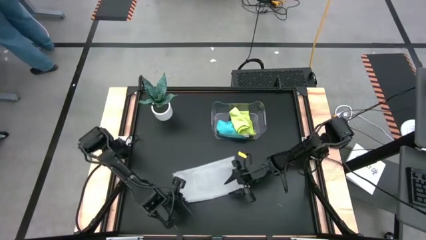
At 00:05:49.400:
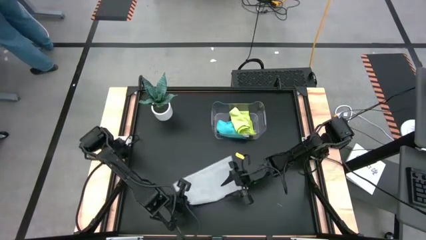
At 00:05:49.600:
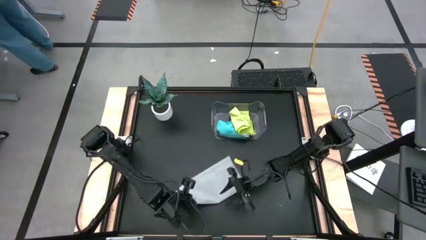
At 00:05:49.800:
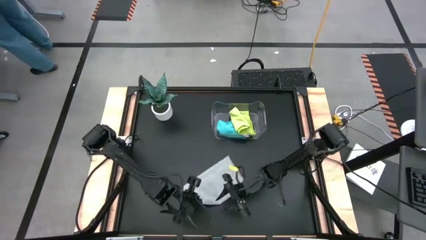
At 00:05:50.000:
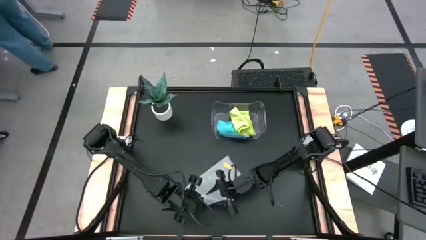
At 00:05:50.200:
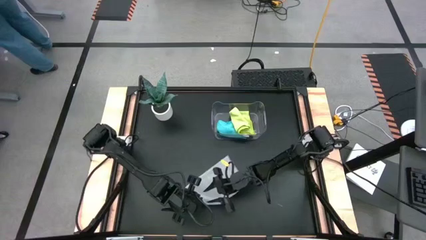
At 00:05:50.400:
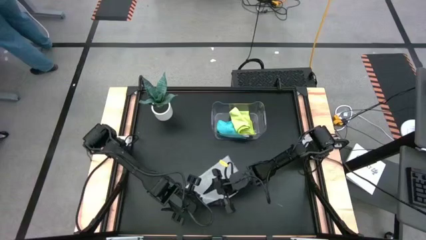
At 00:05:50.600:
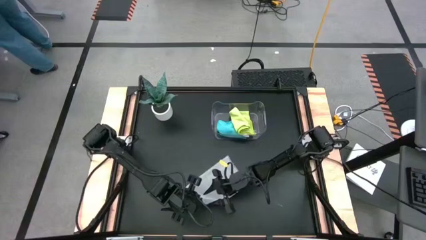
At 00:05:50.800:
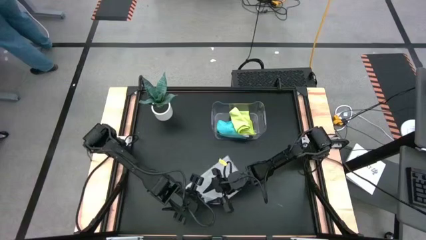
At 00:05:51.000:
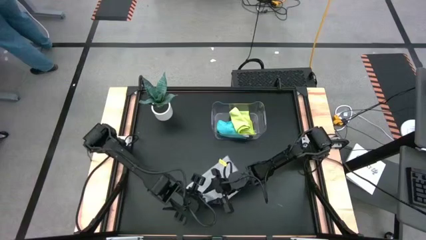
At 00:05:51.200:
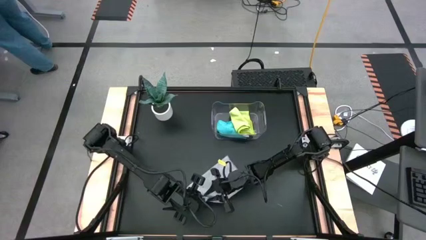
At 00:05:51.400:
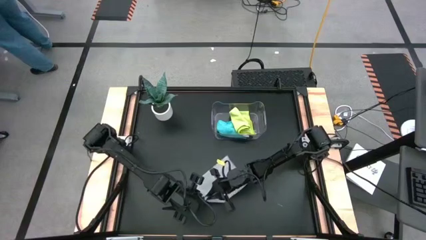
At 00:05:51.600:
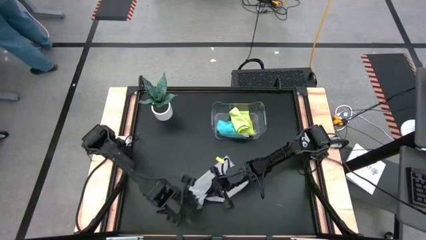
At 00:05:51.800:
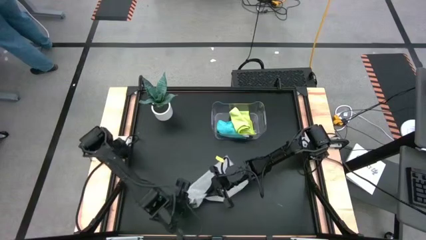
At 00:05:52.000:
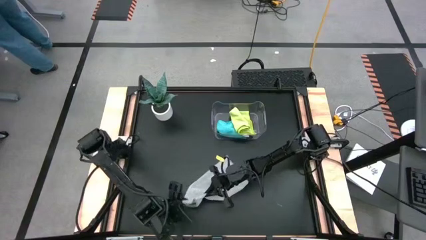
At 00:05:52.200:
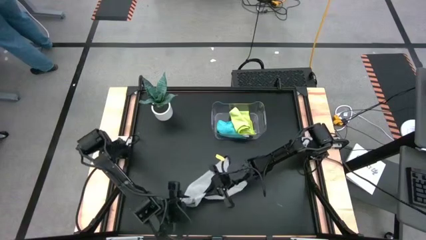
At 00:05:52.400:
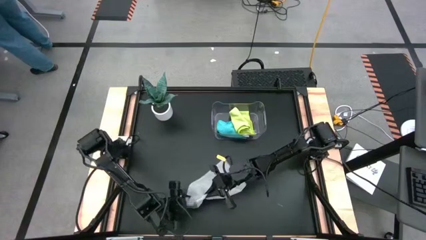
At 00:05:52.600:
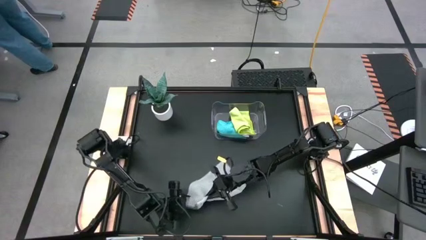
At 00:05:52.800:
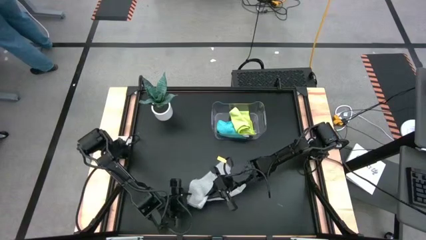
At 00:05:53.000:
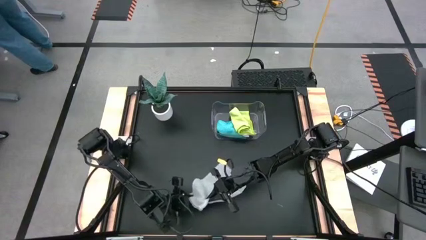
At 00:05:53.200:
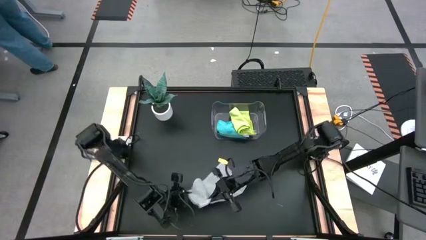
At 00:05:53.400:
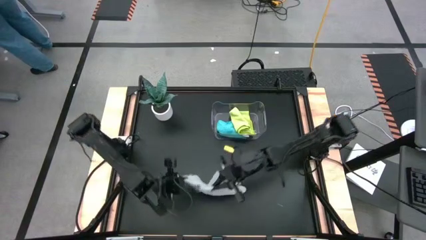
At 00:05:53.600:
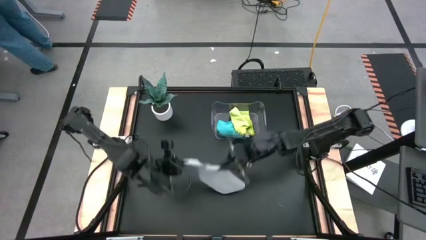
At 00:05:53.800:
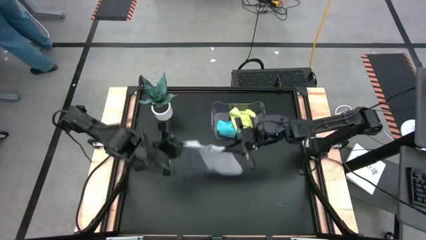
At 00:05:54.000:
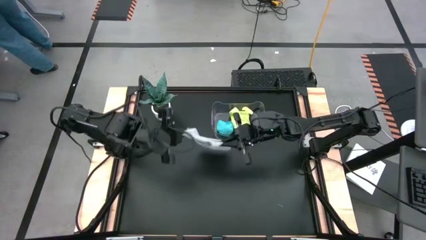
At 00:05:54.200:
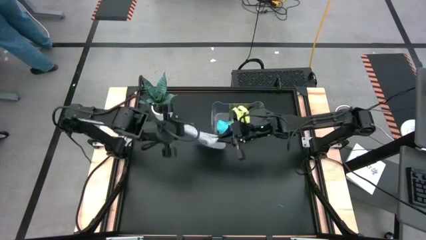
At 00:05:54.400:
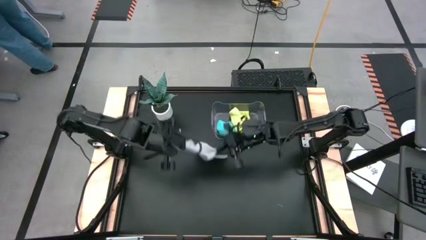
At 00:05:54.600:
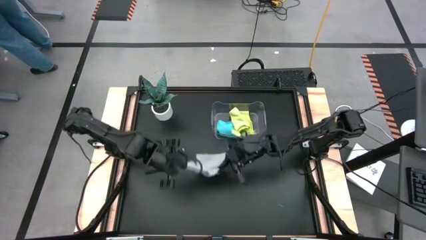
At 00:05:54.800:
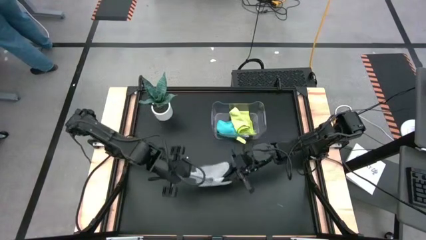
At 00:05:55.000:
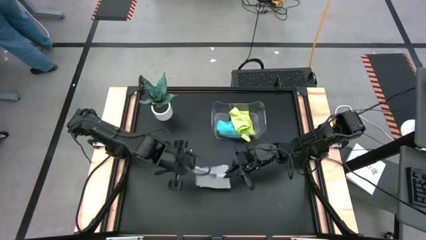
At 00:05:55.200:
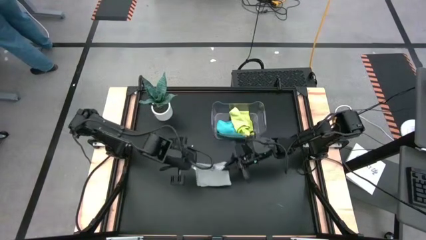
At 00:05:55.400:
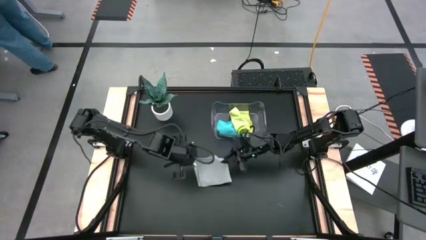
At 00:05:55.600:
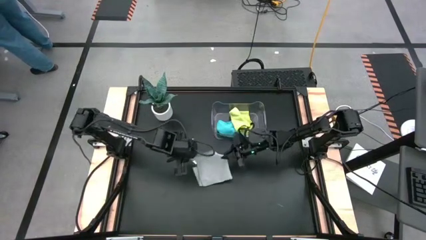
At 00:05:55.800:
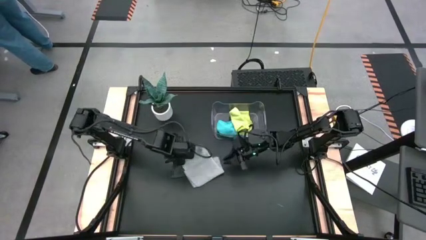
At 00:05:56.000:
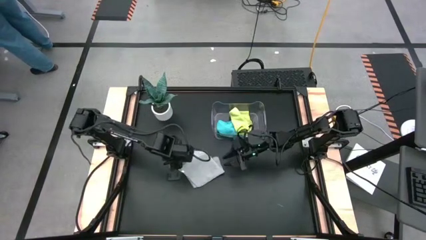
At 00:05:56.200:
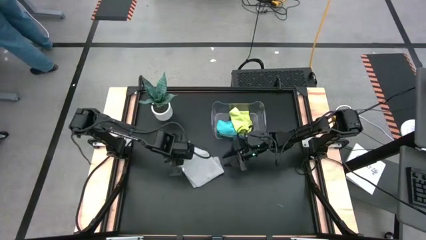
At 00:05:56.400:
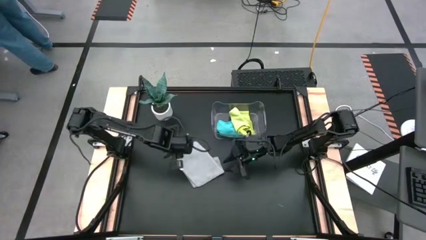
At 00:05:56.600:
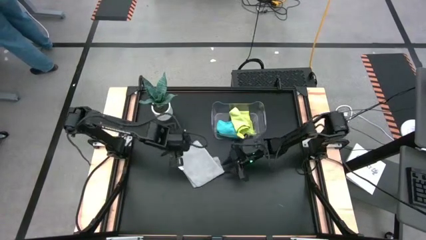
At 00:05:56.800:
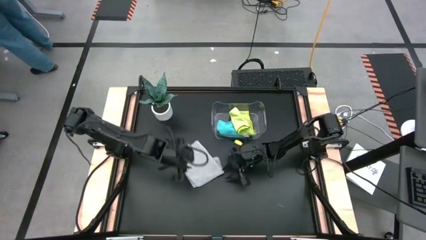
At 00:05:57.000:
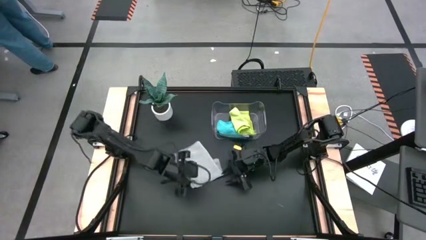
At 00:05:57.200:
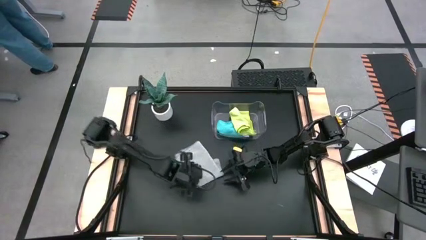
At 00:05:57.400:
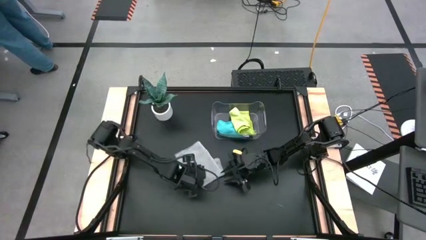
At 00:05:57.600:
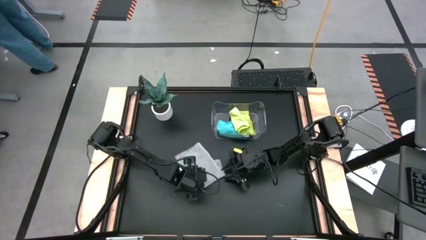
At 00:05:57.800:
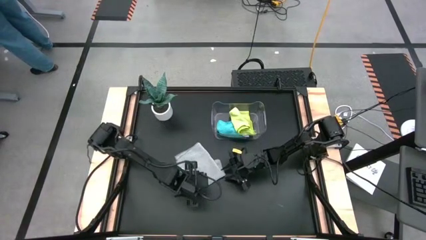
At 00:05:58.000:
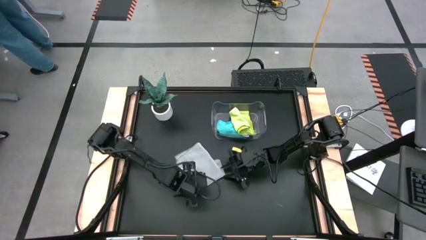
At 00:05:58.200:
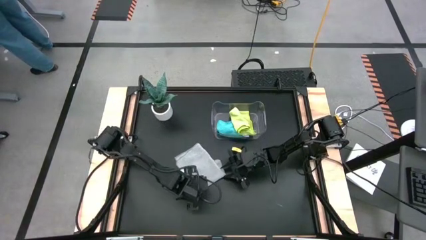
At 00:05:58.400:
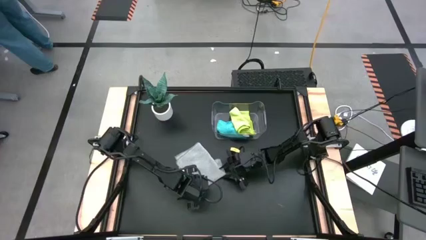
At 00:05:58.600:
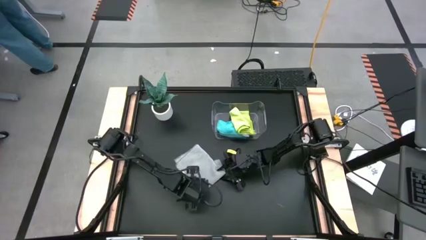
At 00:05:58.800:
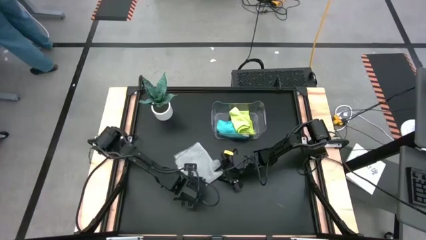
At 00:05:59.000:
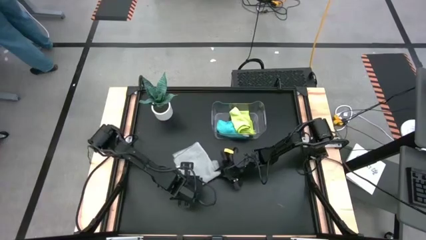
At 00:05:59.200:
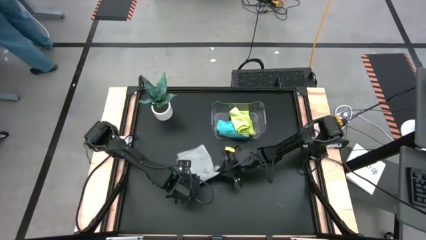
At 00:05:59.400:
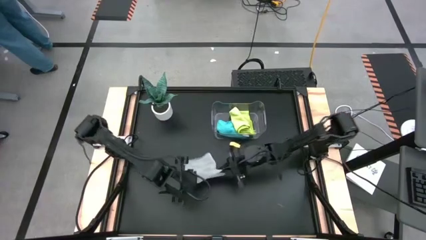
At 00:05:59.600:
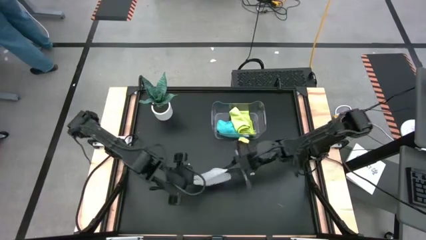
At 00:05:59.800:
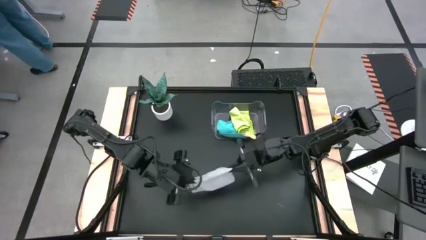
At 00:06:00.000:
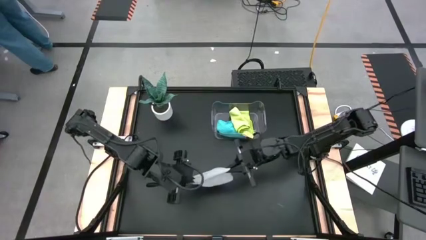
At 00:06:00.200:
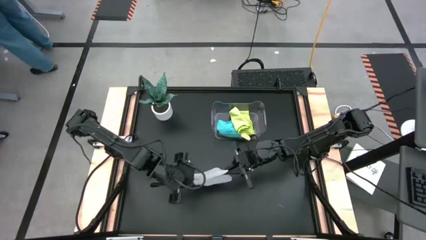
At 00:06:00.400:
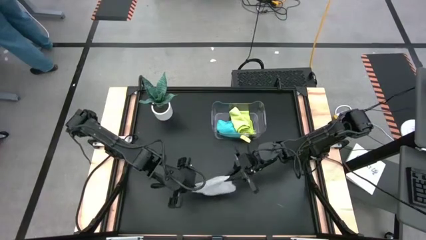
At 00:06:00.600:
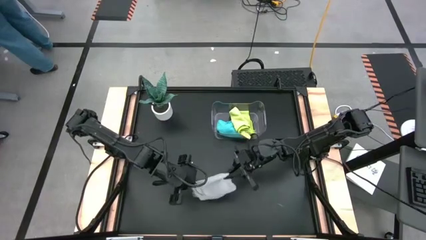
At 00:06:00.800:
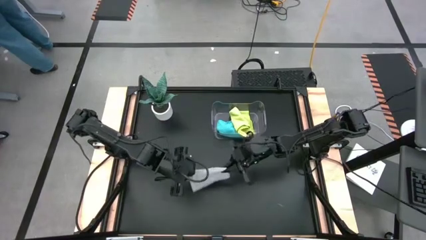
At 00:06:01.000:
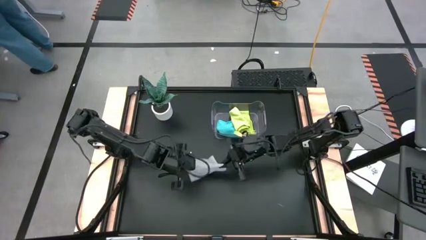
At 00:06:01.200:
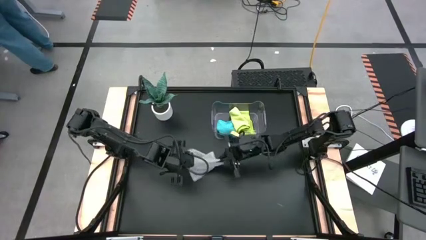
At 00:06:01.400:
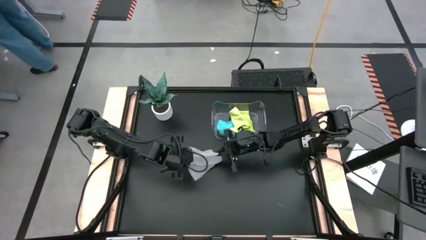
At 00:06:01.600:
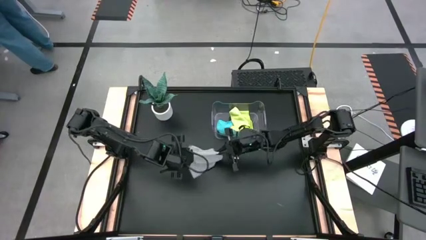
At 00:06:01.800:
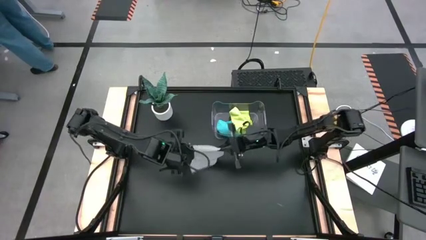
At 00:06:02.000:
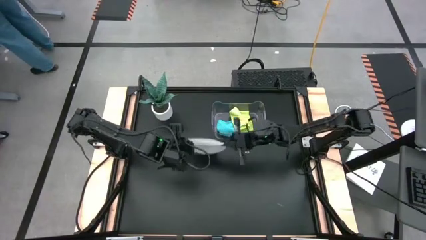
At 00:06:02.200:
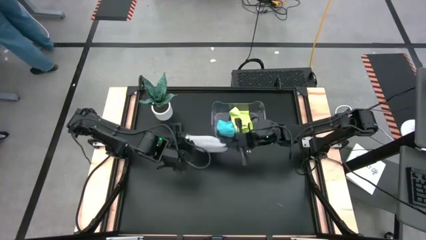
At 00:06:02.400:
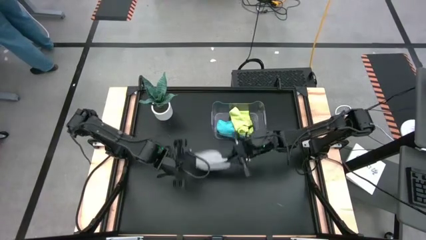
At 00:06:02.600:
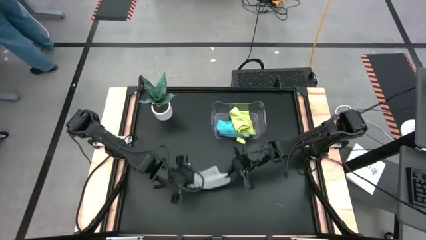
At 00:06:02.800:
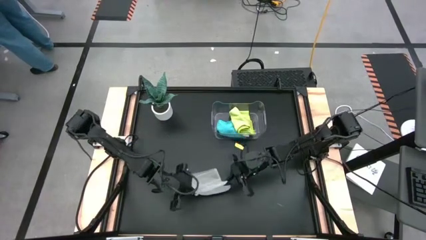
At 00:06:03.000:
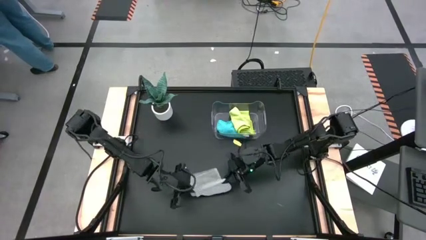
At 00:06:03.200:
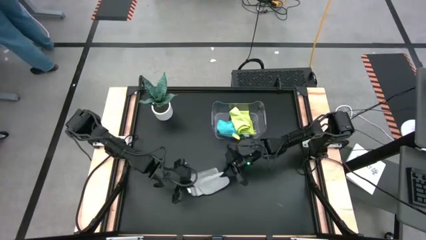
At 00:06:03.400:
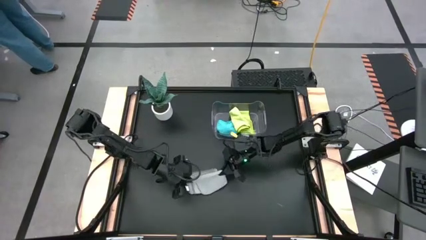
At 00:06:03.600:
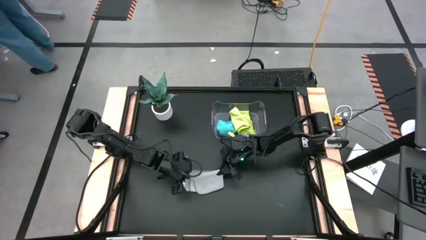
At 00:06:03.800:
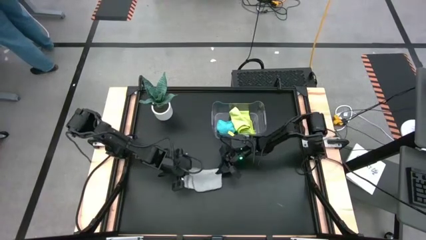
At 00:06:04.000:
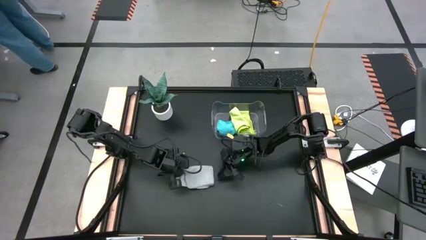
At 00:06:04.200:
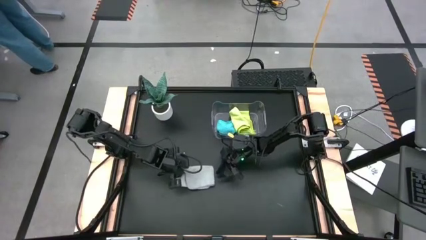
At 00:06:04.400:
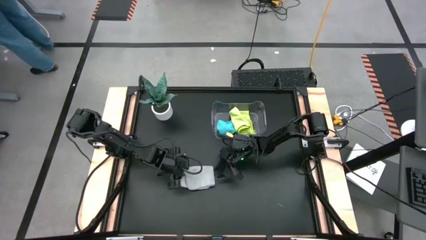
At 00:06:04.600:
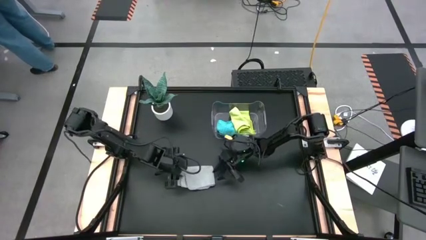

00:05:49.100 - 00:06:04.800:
Task: Fold microfiber towels
Fold the gray towel
